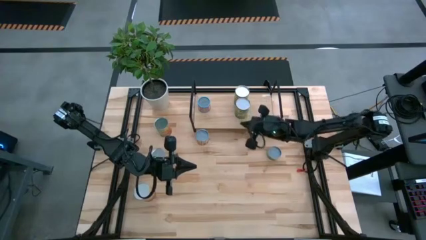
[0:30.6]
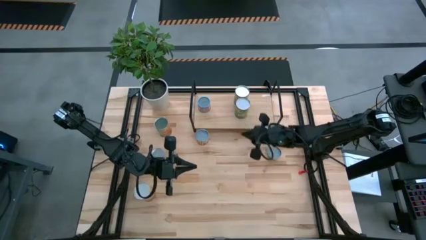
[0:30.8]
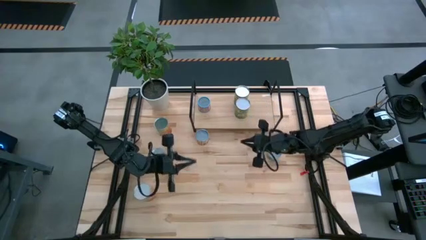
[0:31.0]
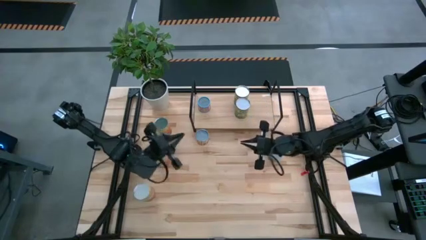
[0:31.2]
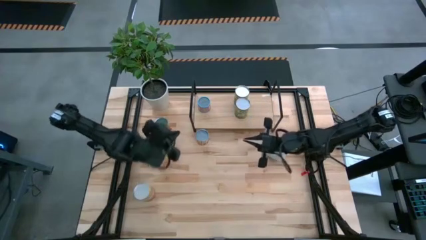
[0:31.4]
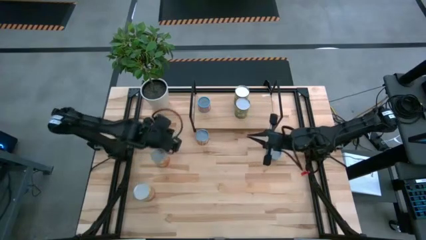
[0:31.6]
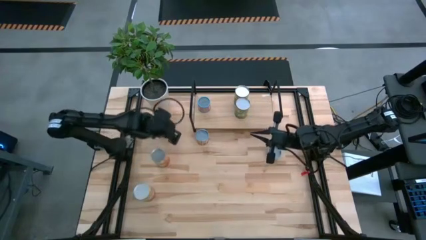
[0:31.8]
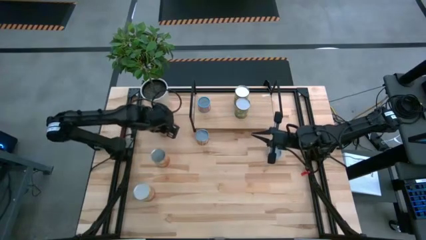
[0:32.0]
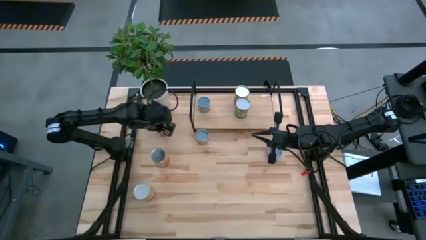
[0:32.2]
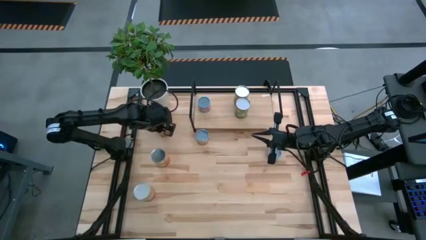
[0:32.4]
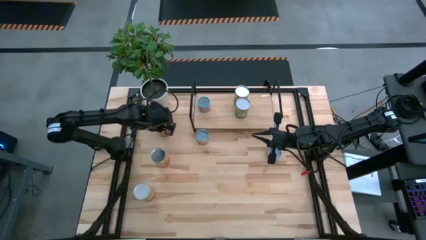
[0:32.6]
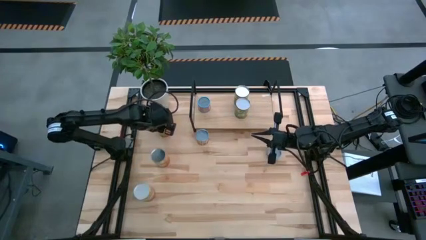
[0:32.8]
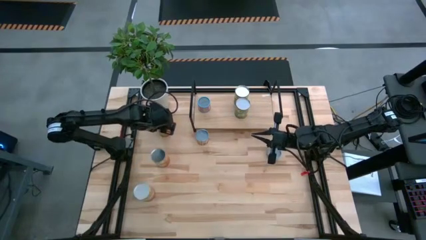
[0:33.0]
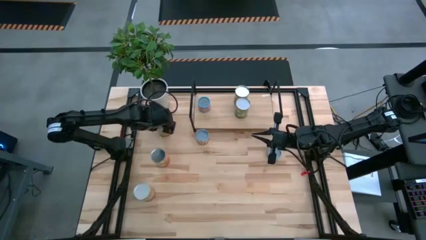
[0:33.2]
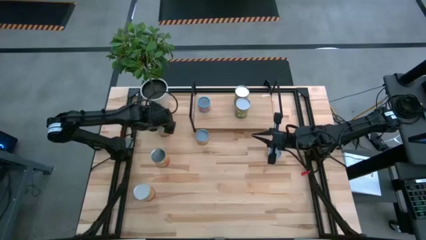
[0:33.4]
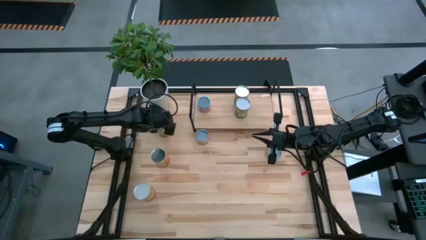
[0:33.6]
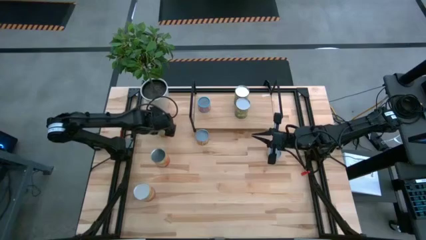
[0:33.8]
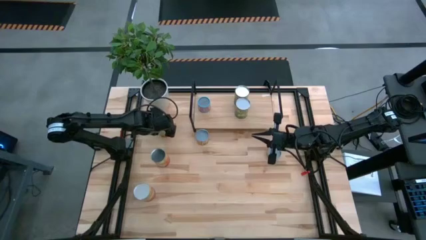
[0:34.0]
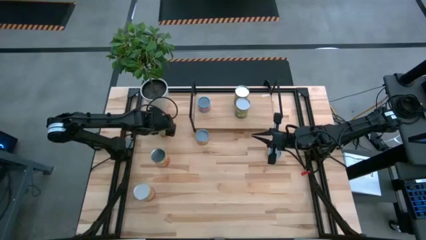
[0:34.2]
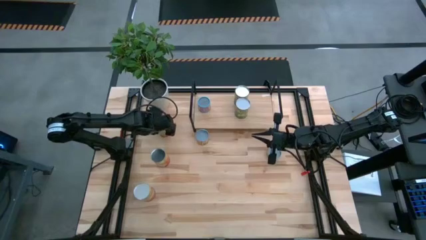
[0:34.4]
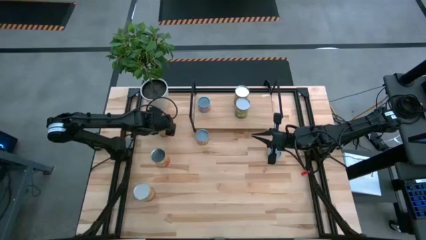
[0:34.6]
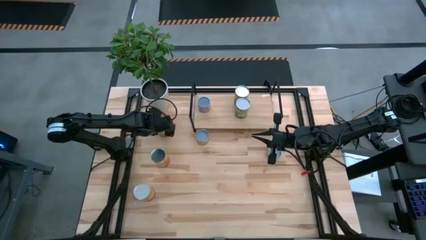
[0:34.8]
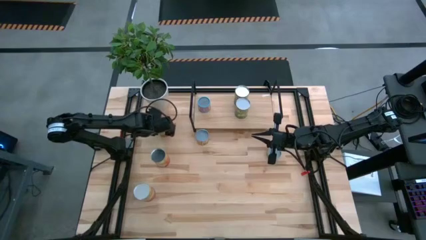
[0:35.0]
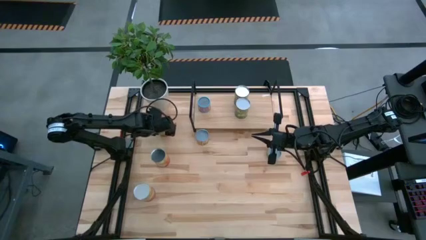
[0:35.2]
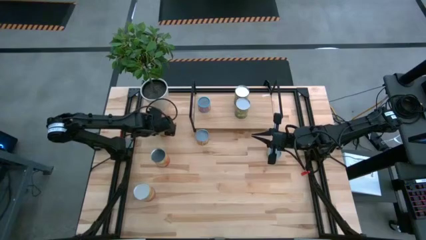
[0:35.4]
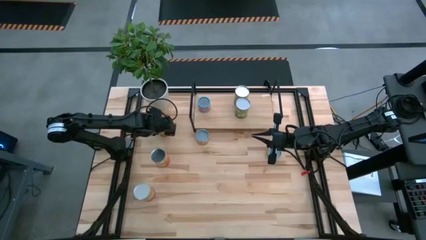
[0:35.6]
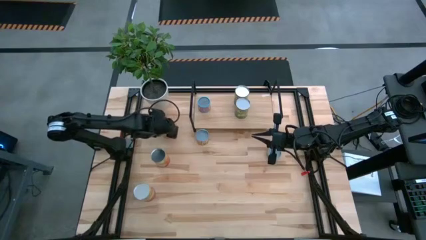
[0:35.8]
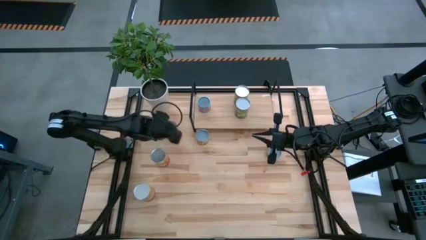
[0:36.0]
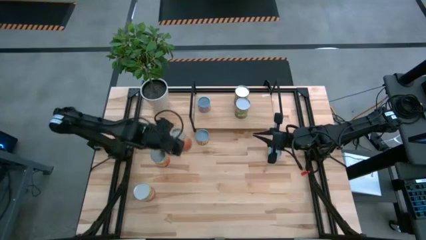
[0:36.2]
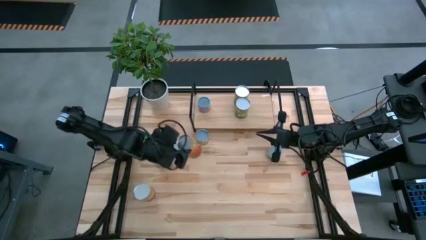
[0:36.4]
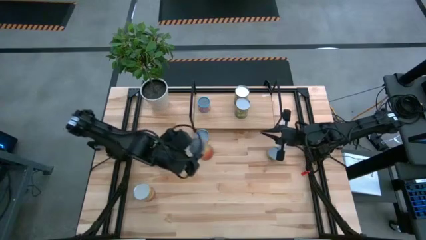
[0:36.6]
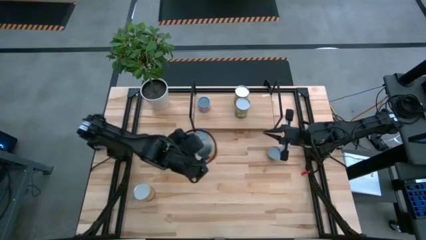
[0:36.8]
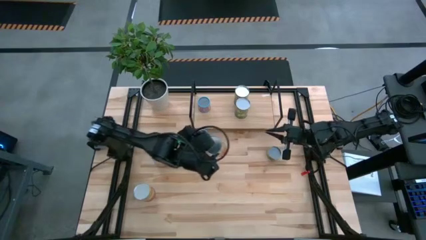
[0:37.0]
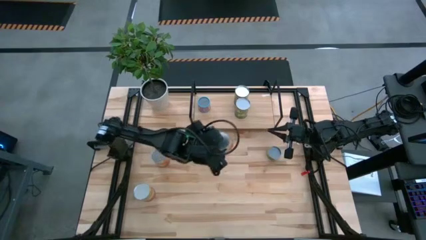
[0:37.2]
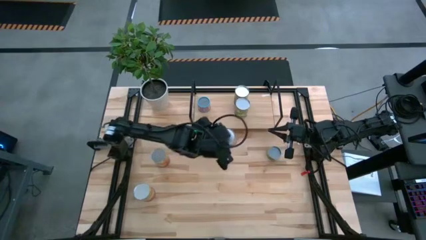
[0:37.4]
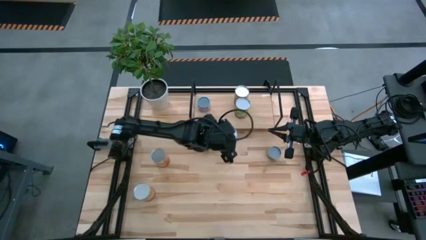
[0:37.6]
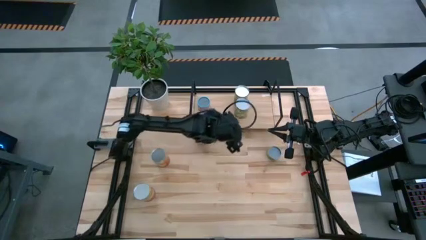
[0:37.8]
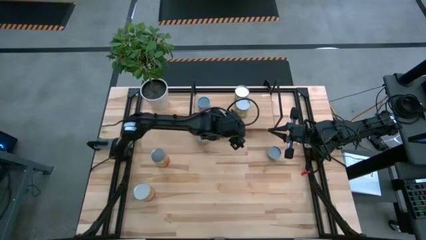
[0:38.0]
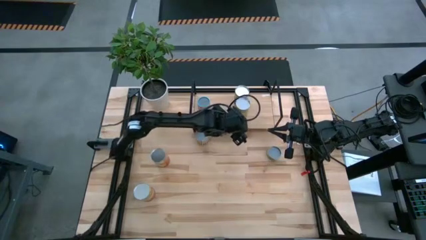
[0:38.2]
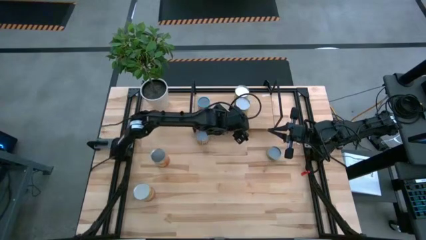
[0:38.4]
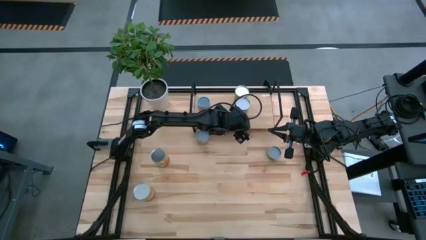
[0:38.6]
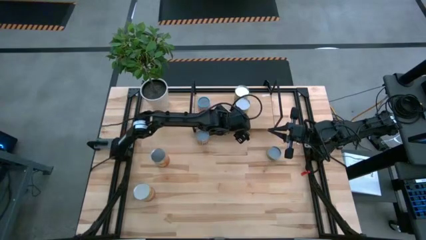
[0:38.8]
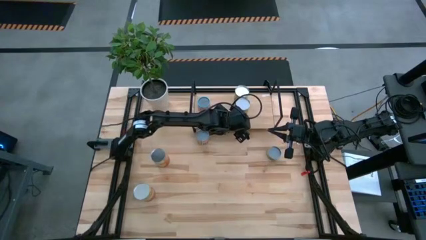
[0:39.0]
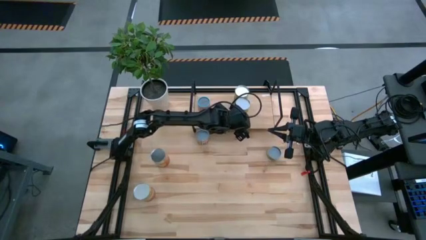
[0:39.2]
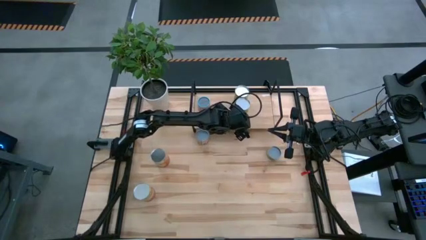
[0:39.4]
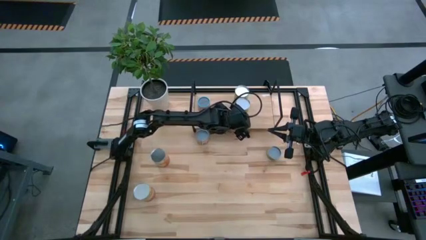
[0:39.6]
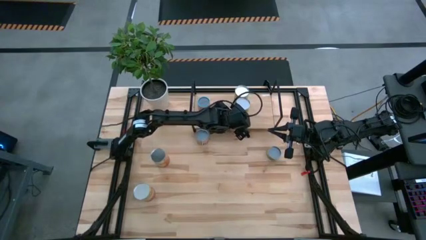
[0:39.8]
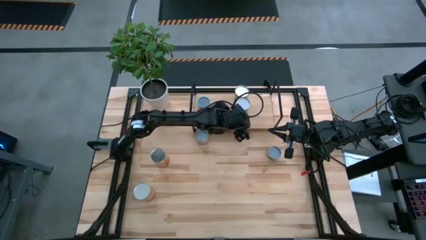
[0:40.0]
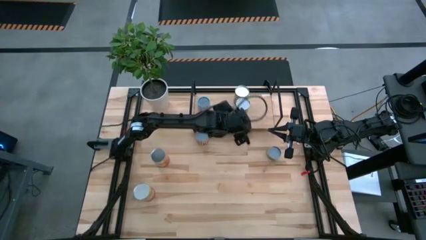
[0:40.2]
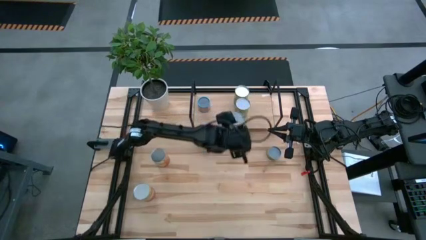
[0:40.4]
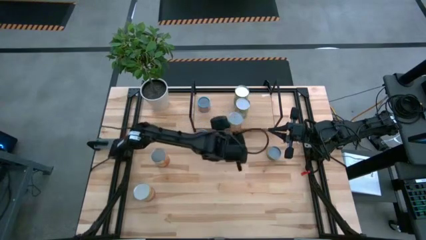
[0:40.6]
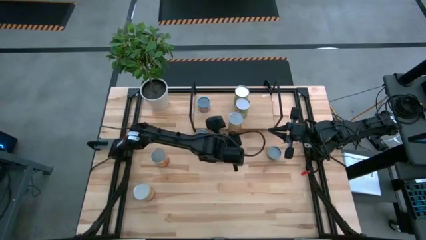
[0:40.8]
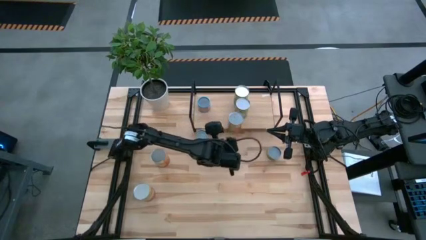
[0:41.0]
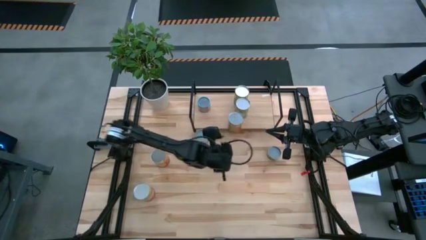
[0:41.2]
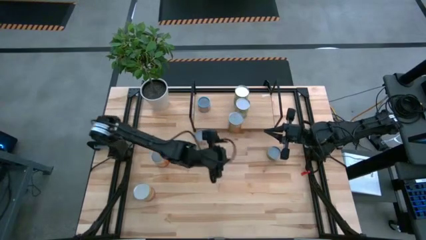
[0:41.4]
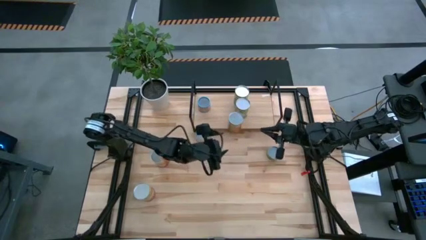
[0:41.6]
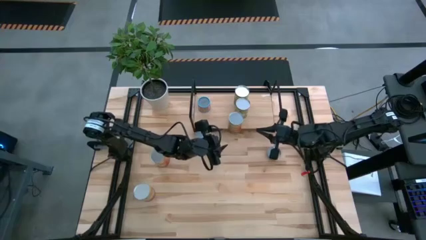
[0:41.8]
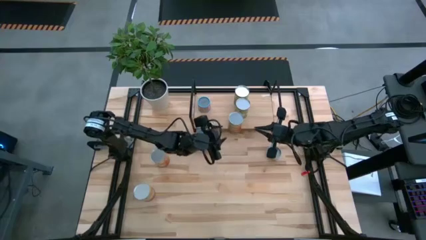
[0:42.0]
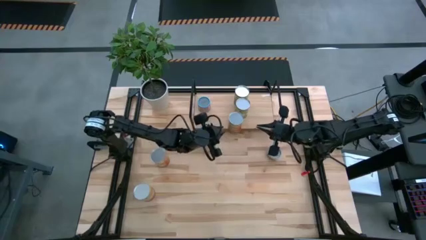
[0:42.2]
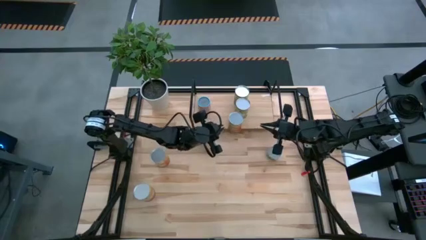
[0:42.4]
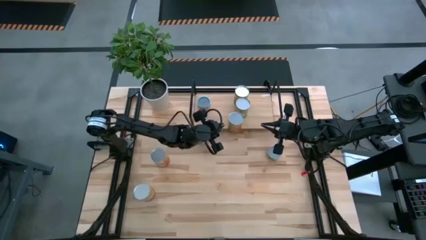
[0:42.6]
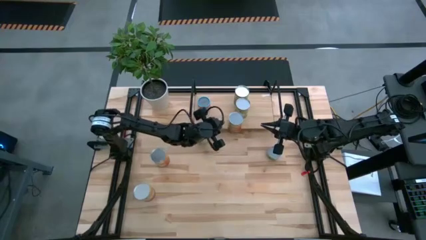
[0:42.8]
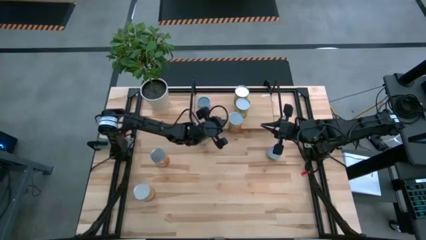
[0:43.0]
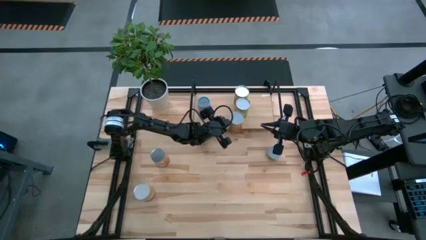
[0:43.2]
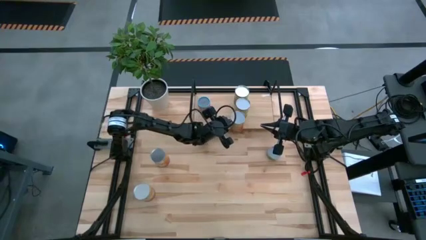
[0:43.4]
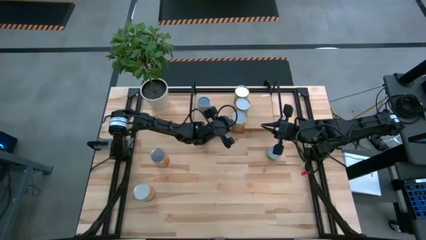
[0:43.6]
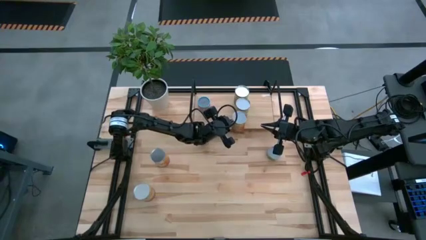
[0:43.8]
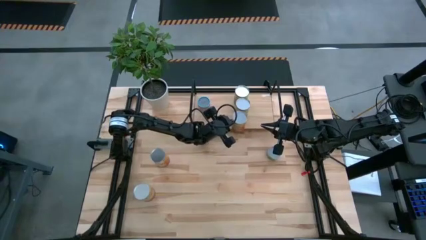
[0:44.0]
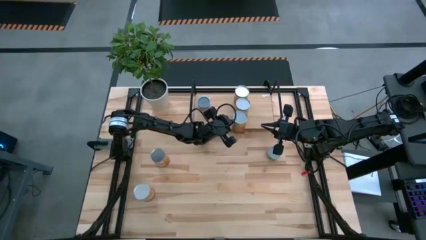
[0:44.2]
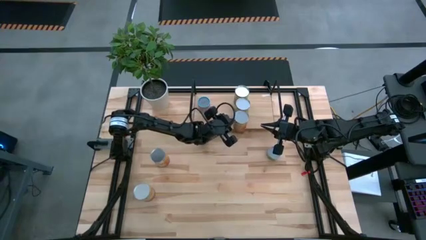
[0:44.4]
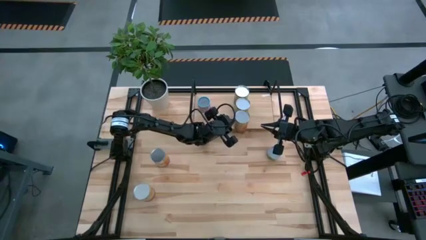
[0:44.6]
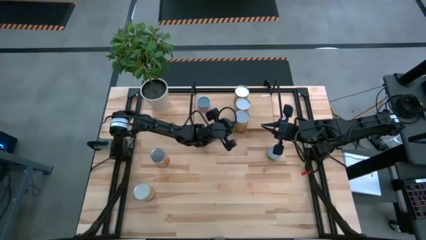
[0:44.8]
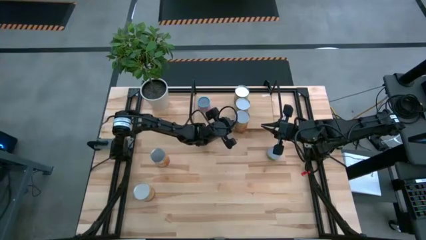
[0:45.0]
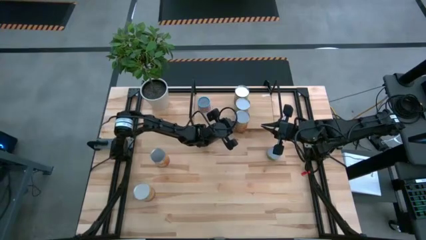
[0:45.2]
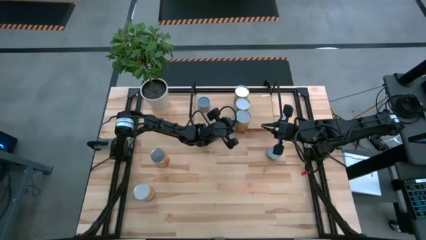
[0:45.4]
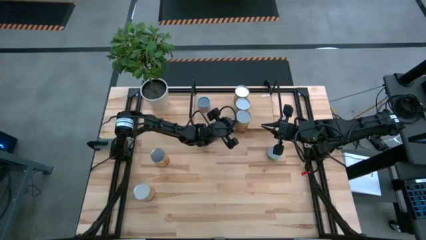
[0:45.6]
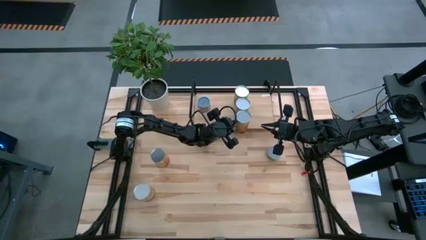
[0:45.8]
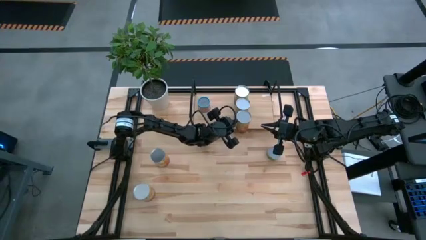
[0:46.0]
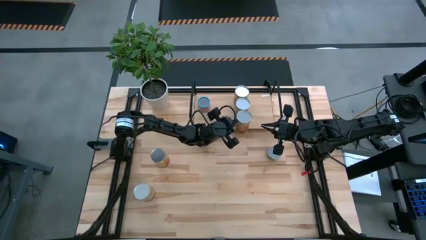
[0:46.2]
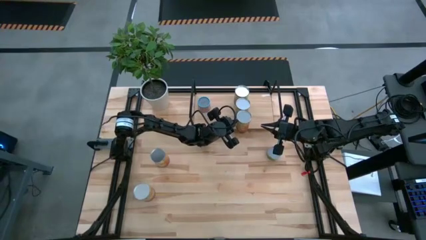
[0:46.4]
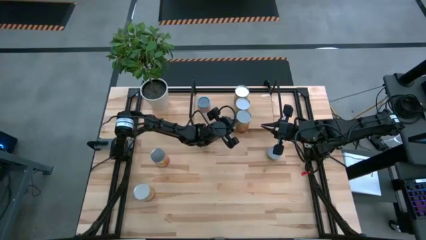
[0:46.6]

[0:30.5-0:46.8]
Task: Pick and place cans onto a shelf
Put the canned green beans on the shelf
